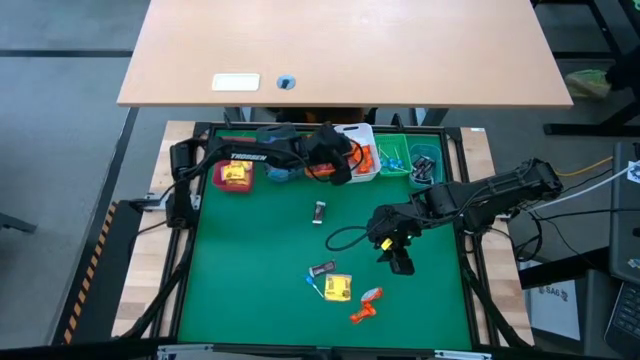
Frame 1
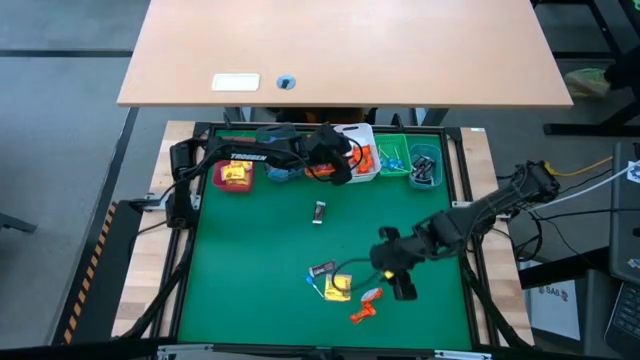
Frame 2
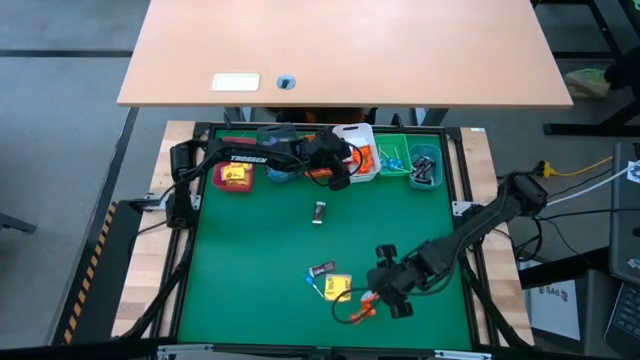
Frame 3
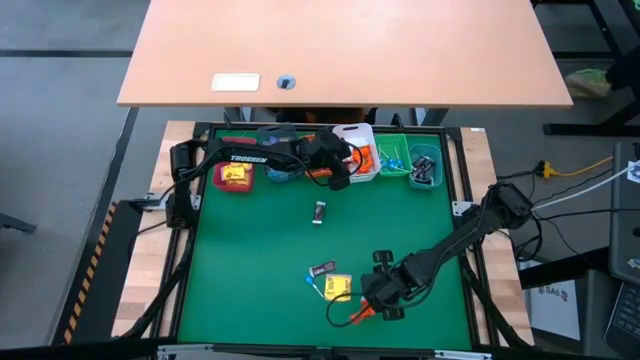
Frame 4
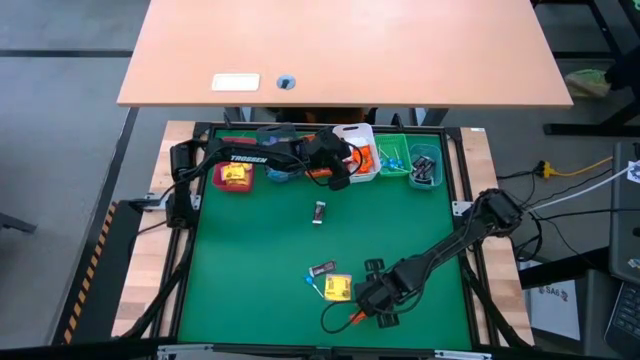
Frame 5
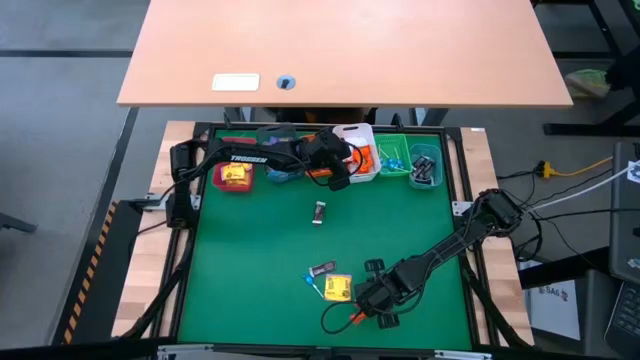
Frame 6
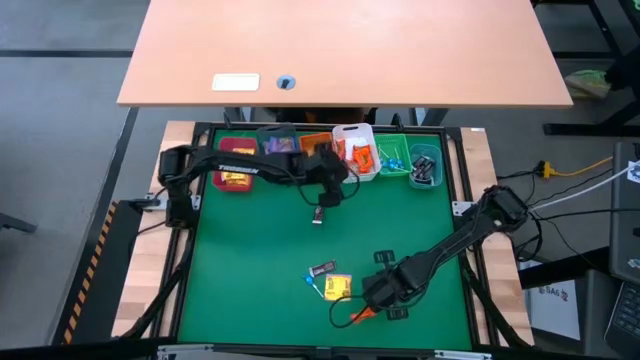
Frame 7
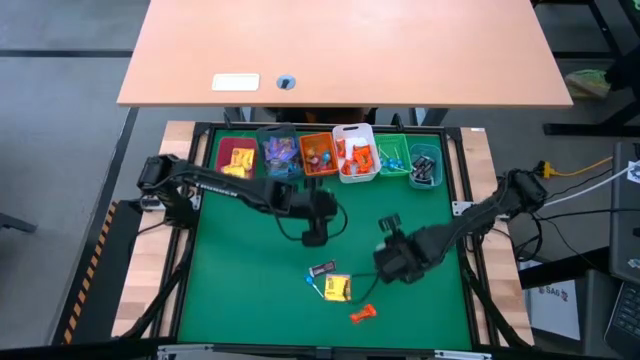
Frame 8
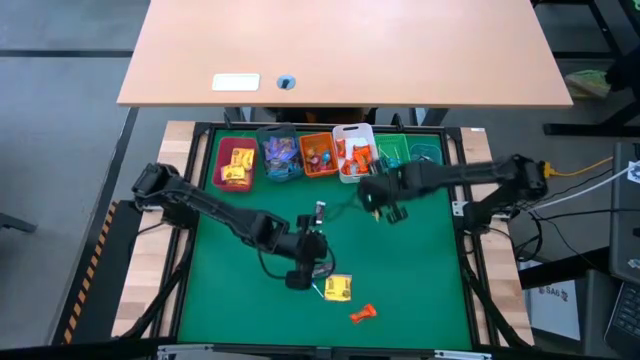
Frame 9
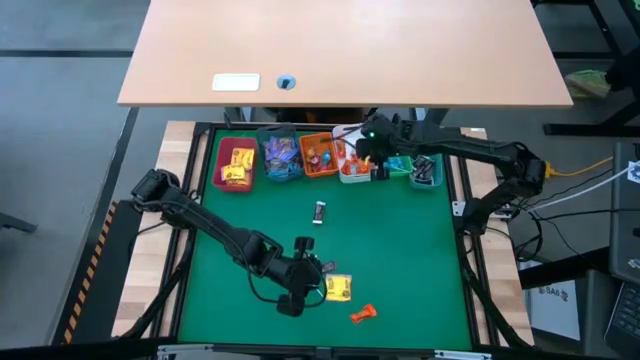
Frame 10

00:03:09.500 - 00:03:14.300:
Task: Sort candy
Put the orange chocolate into the white bin

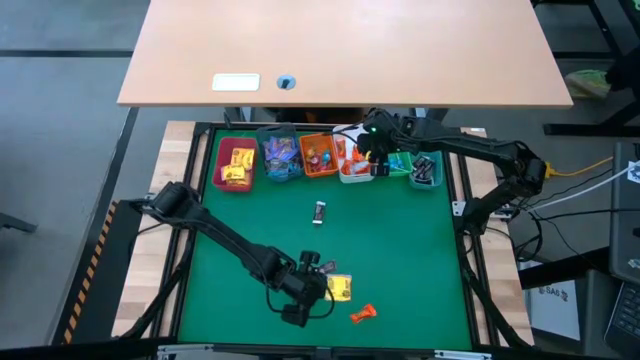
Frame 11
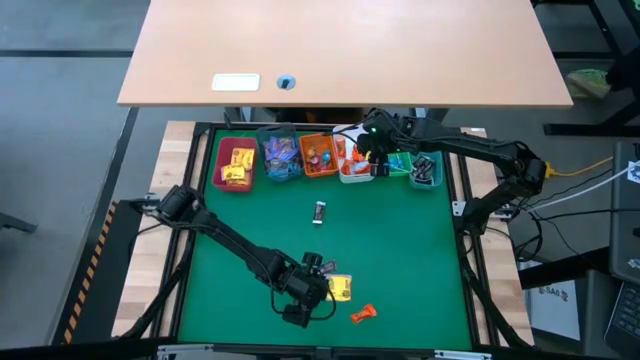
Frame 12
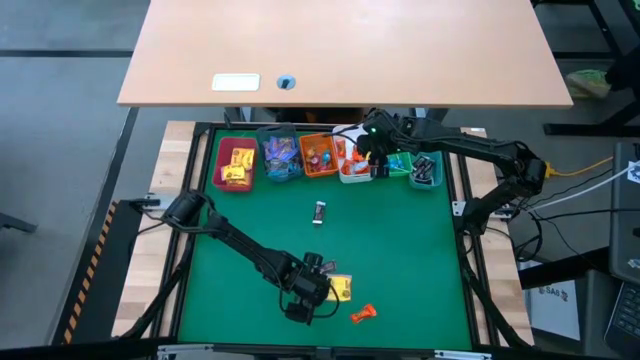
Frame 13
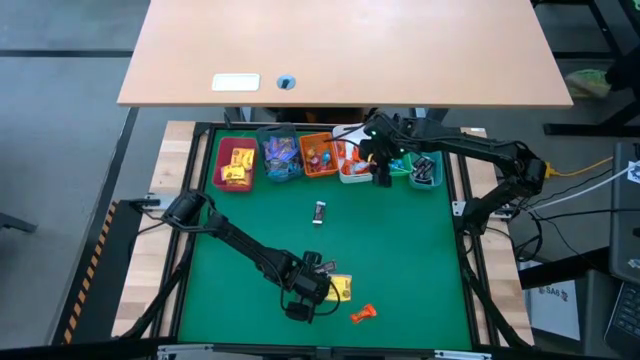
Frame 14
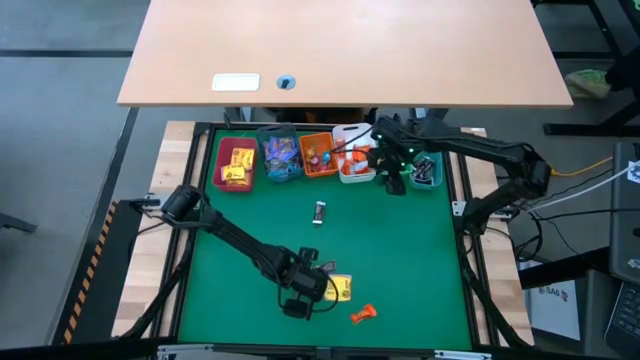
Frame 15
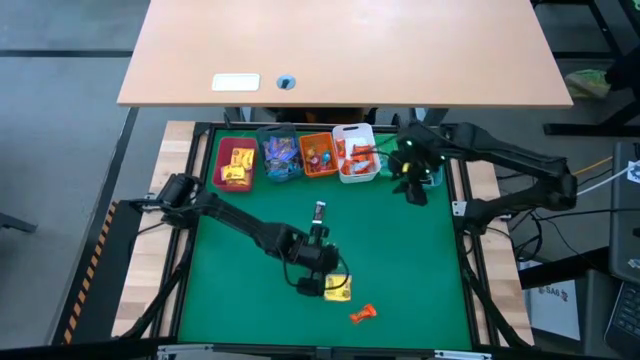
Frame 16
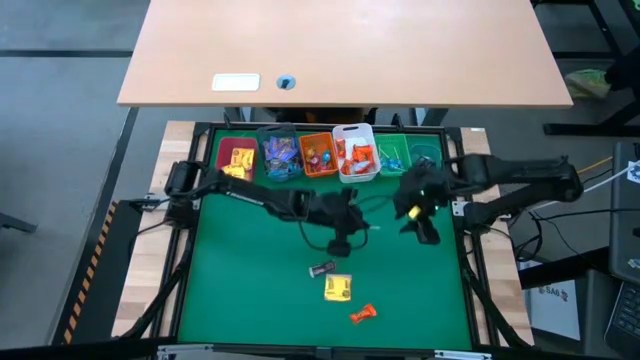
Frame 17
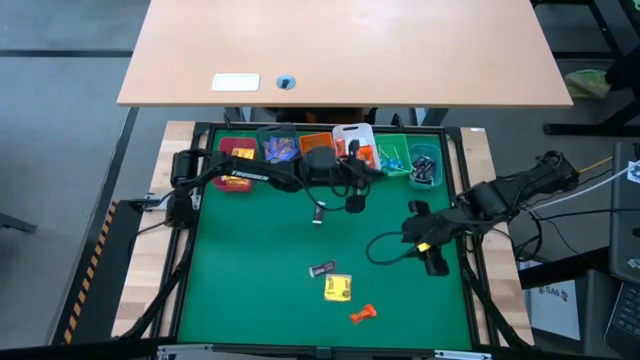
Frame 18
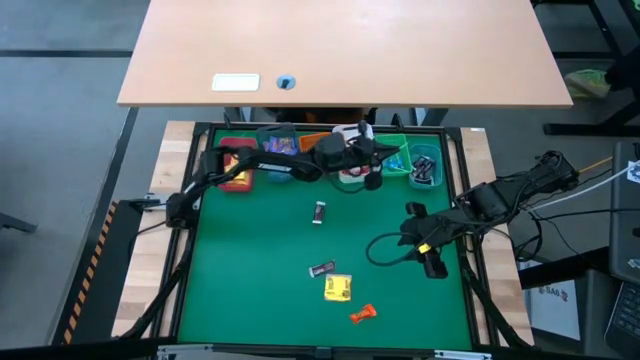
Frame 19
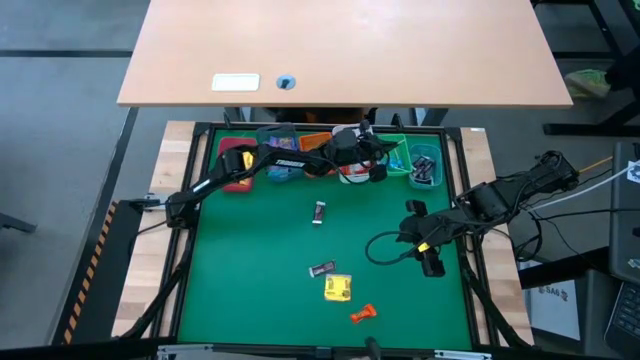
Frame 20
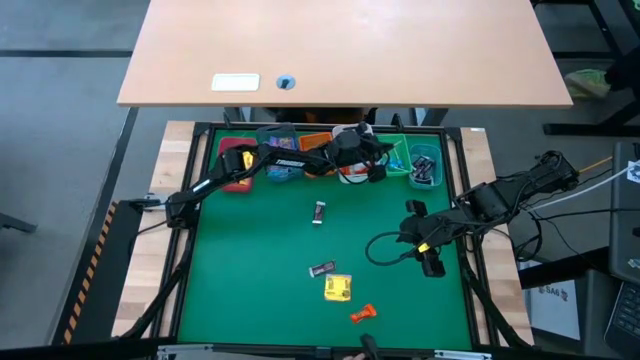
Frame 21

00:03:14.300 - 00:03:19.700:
Put the blue lollipop into the green bin

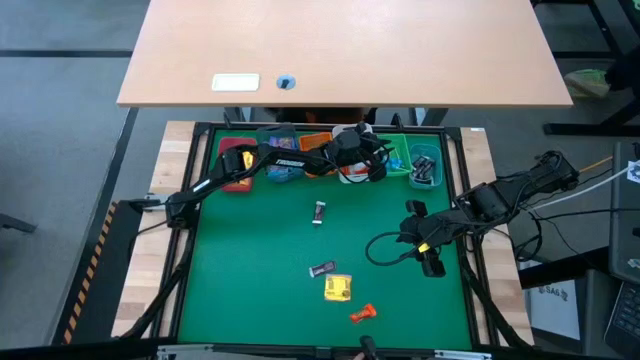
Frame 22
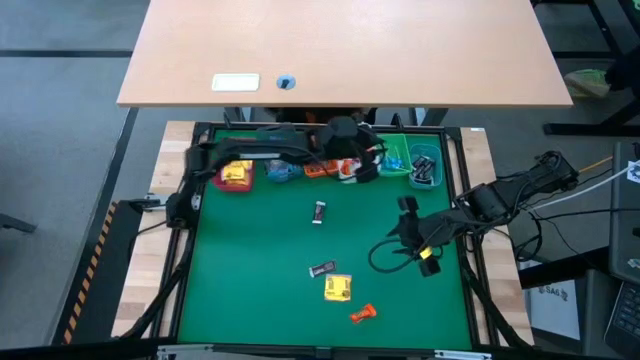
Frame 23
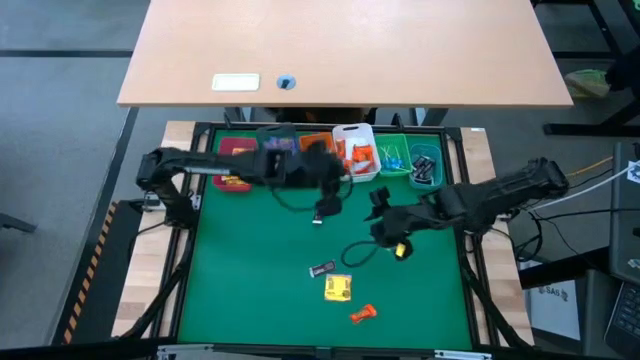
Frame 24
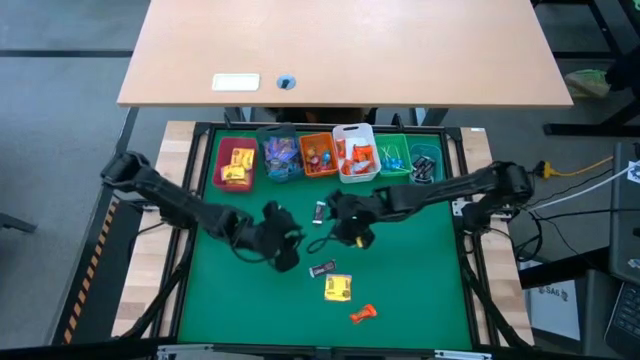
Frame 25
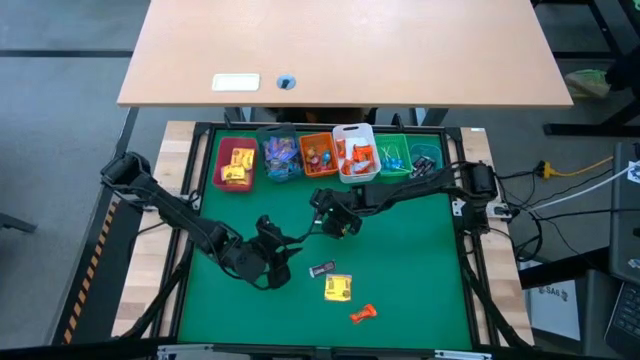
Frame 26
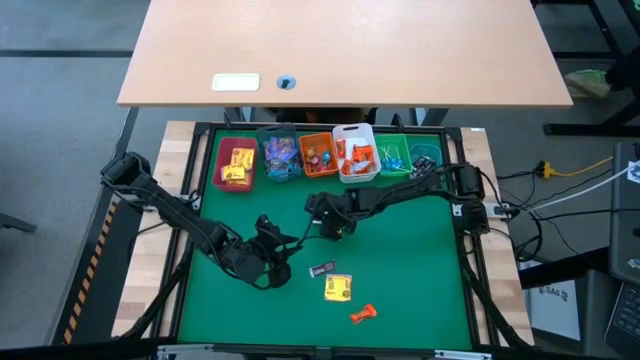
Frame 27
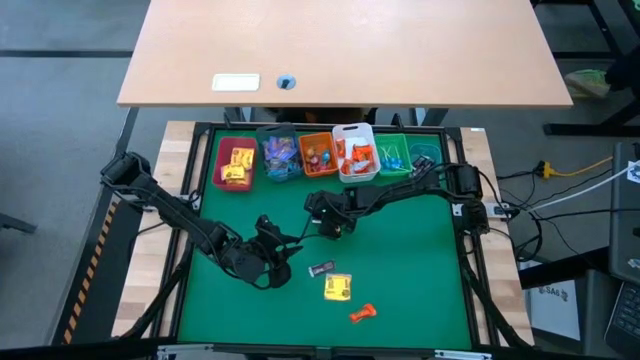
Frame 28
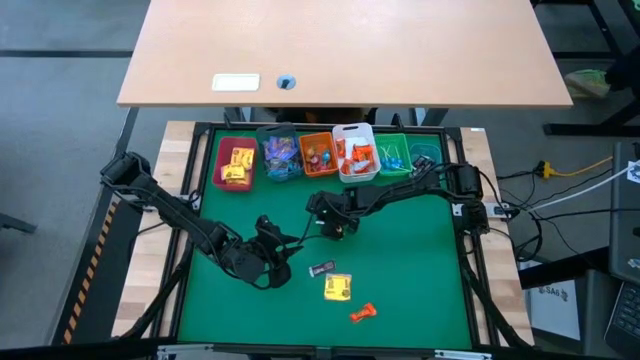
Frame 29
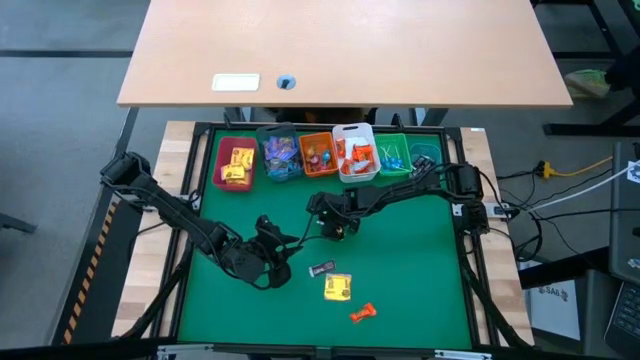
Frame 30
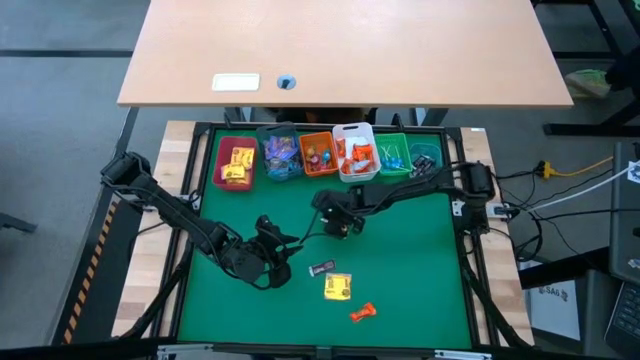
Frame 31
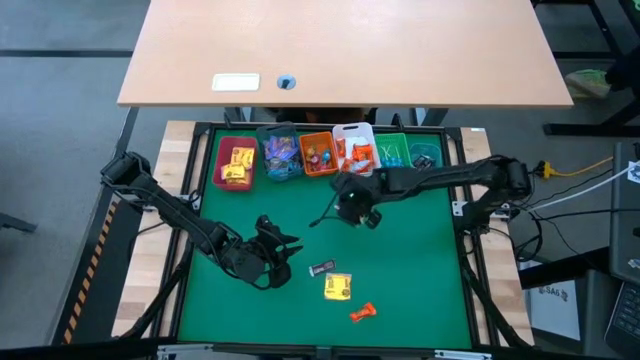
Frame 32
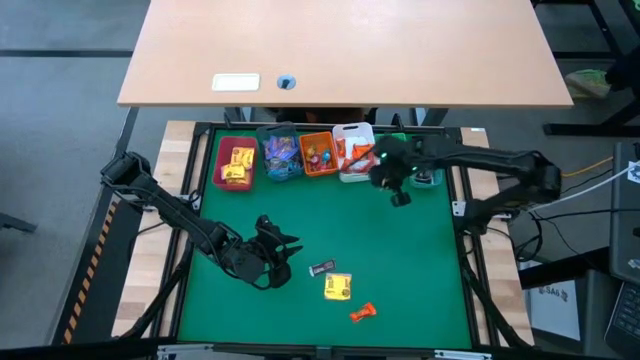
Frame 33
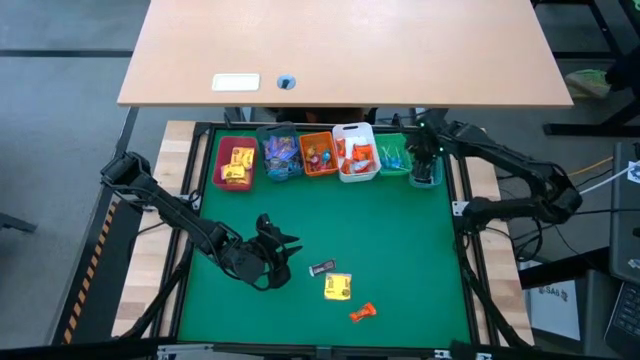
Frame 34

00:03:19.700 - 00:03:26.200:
Put the brown chocolate into the blue

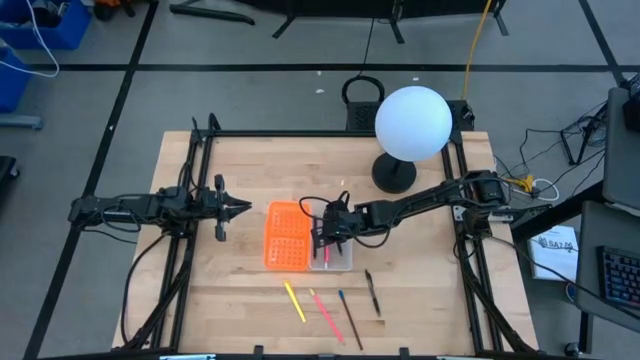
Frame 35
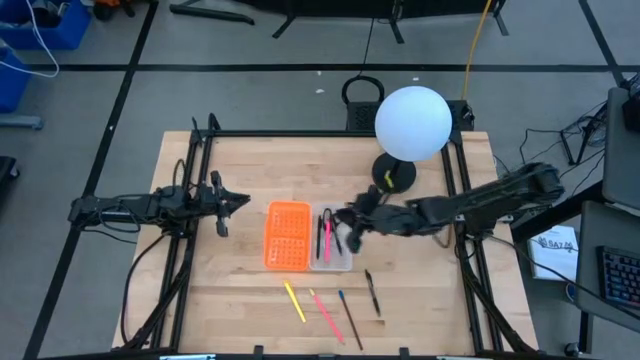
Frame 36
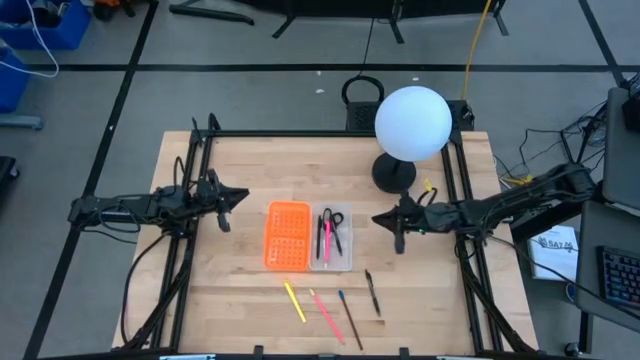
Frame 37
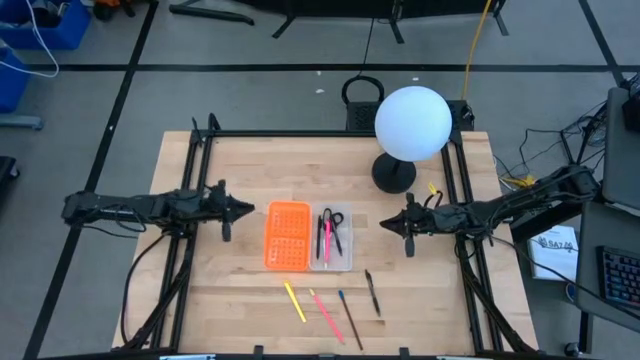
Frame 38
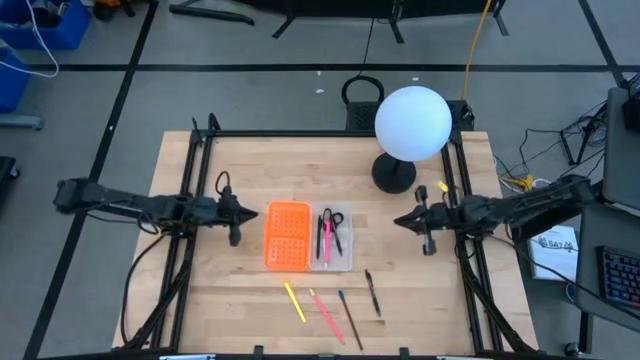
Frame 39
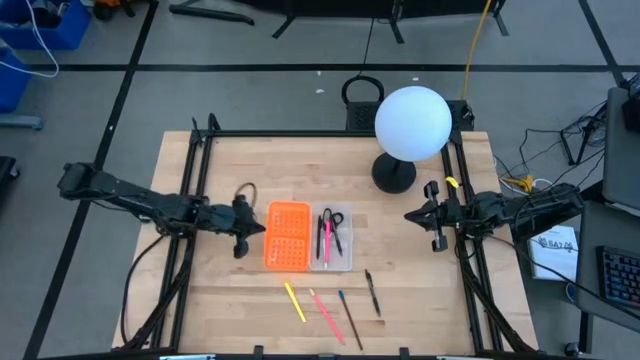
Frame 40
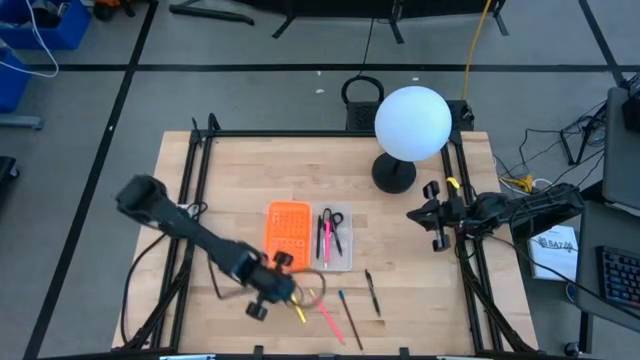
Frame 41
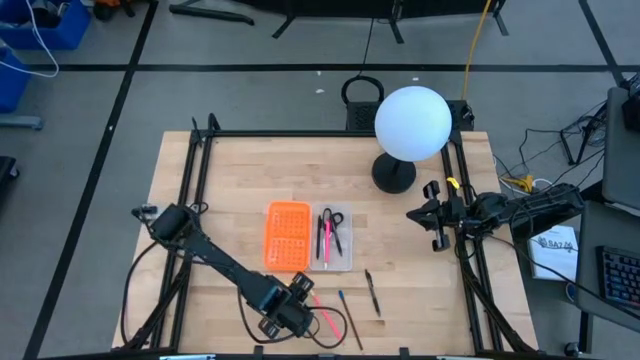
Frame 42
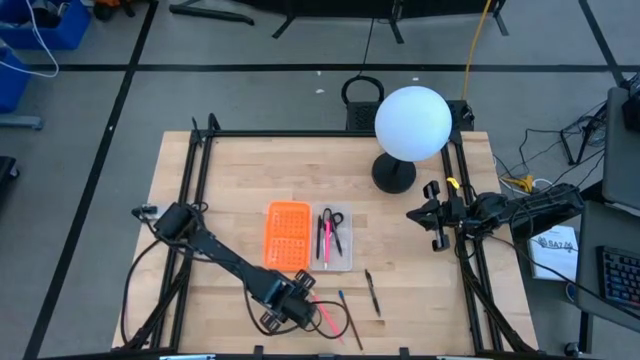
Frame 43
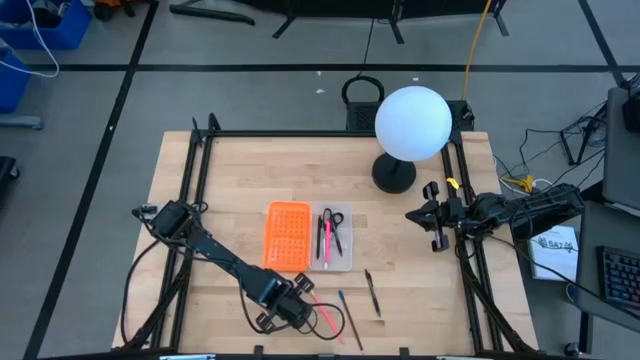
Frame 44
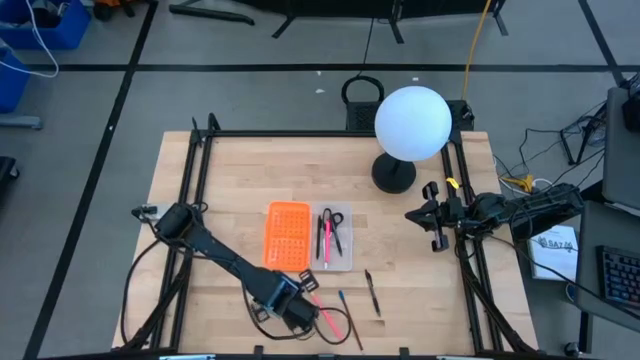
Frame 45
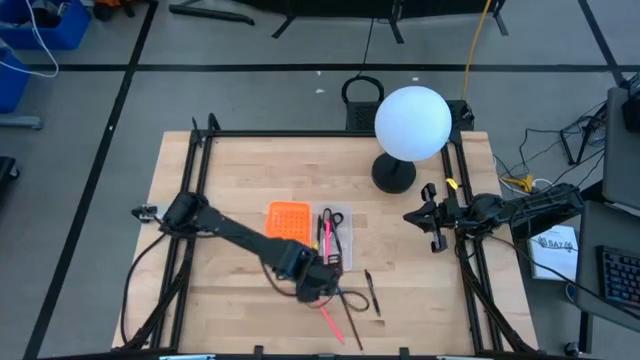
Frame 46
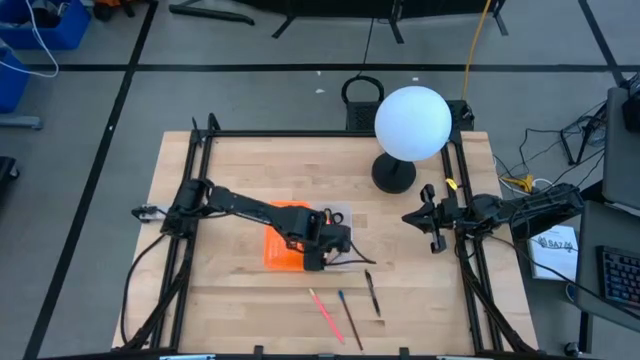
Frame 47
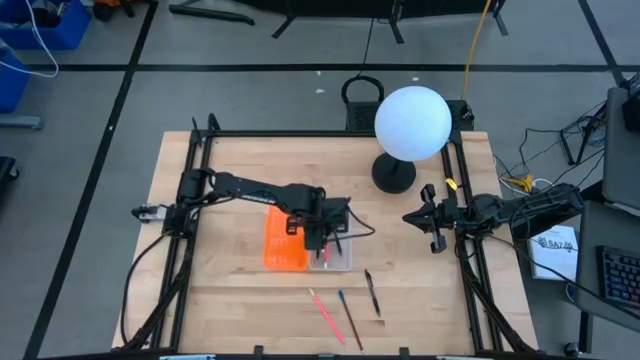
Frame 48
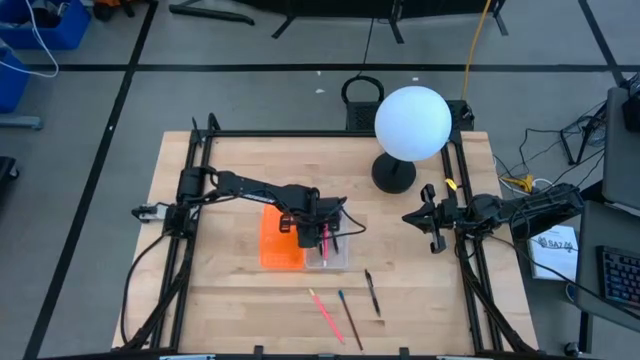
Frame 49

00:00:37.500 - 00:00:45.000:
Task: Pick & place school supplies into a supply box
Put the yellow pen into the orange supply box
